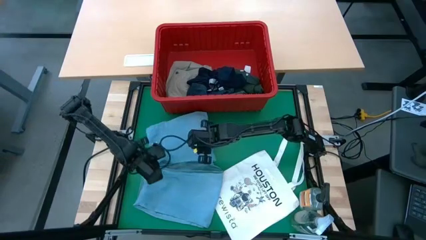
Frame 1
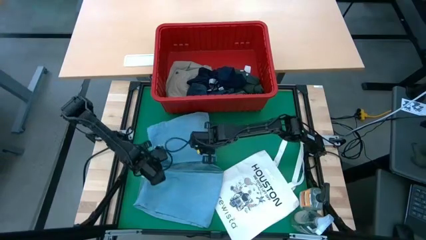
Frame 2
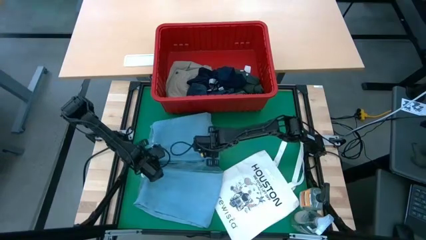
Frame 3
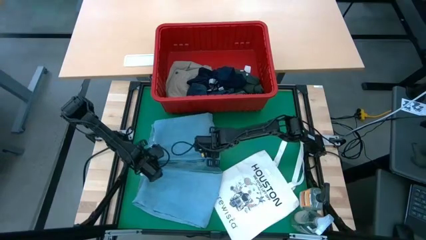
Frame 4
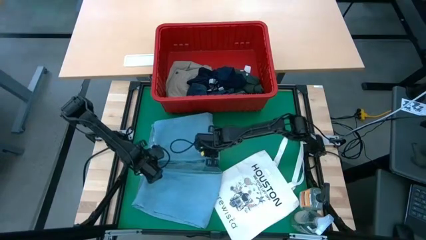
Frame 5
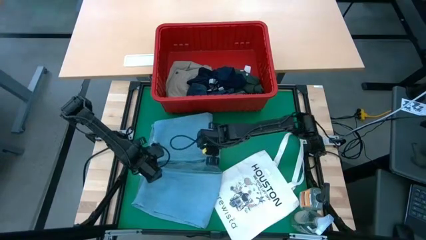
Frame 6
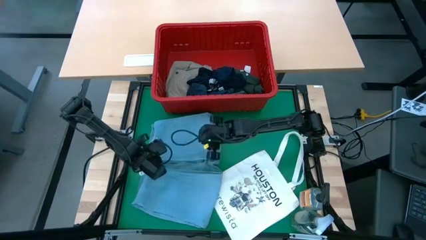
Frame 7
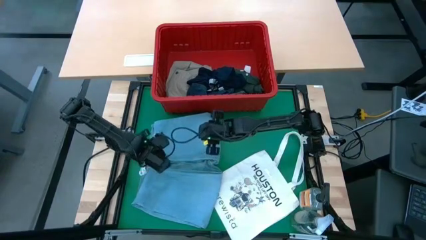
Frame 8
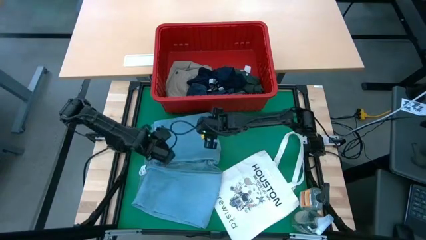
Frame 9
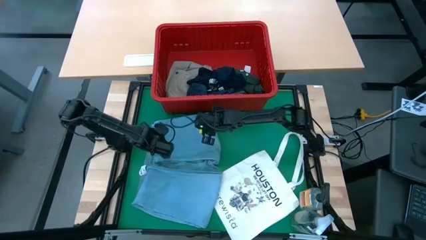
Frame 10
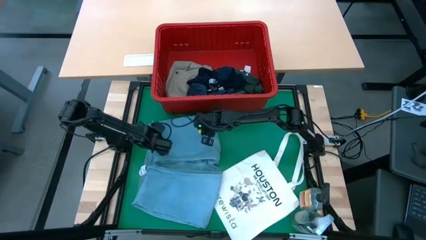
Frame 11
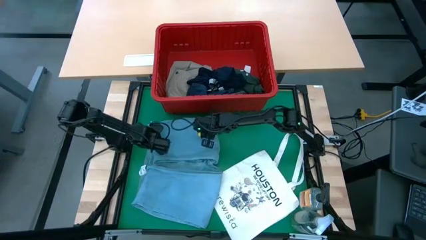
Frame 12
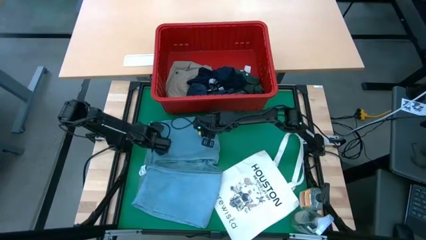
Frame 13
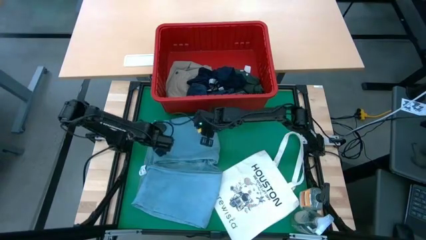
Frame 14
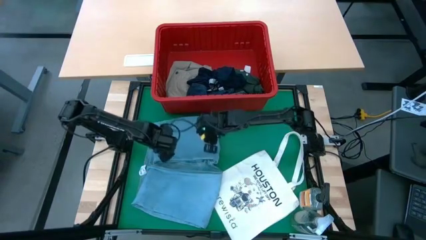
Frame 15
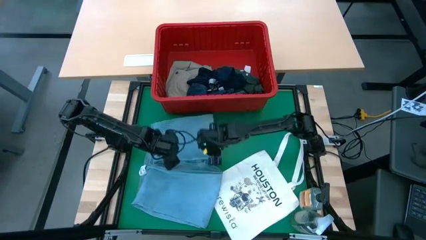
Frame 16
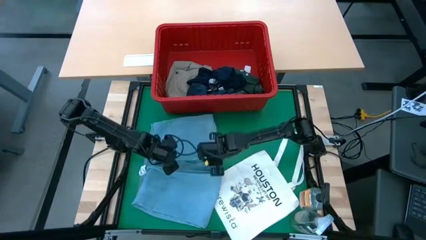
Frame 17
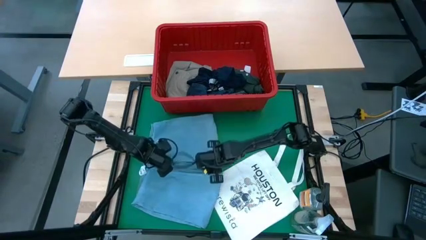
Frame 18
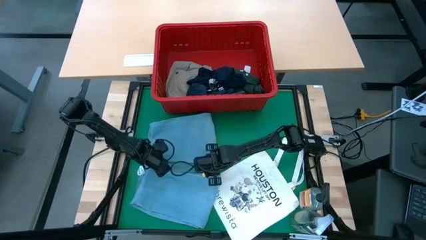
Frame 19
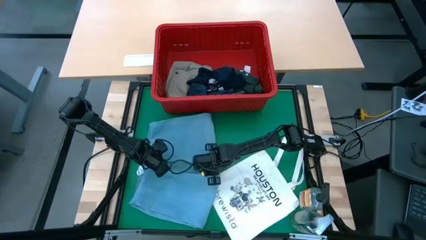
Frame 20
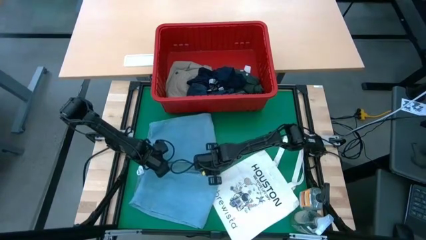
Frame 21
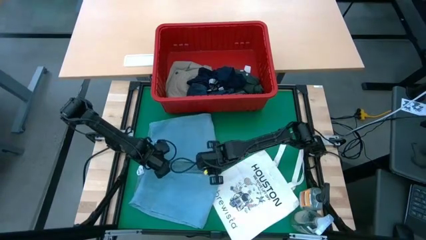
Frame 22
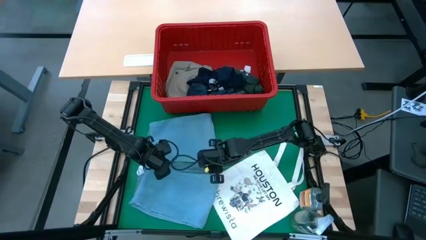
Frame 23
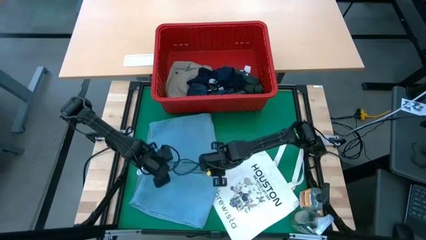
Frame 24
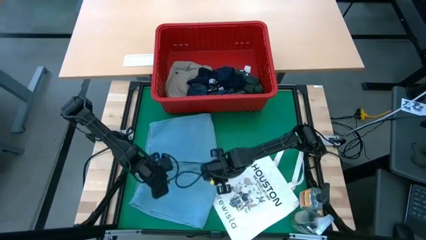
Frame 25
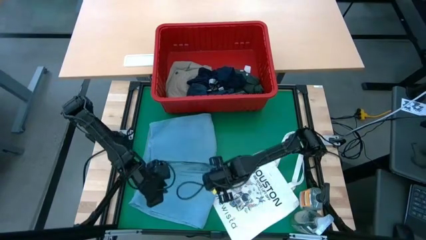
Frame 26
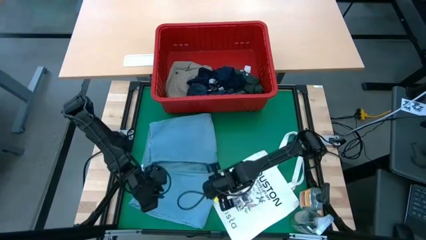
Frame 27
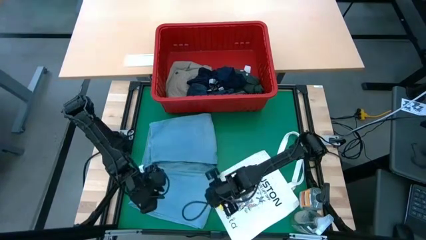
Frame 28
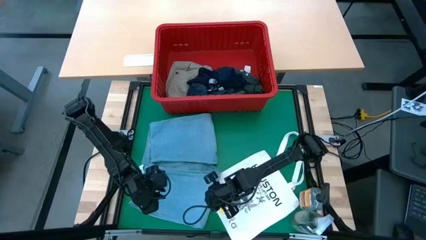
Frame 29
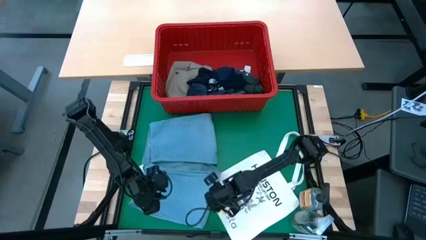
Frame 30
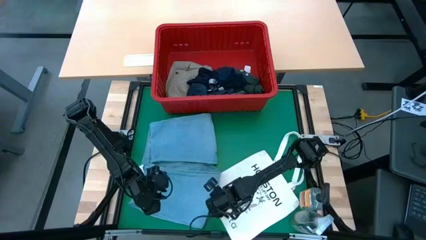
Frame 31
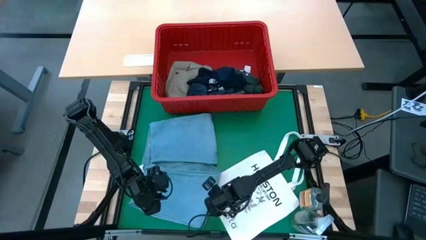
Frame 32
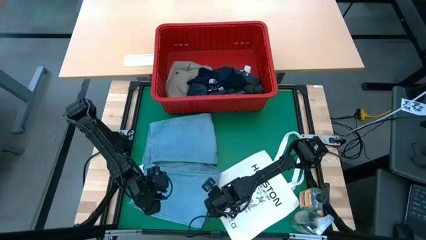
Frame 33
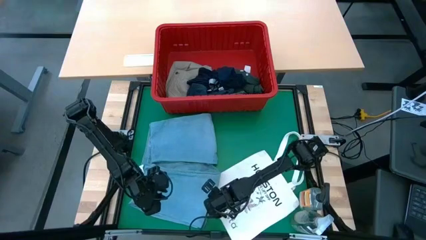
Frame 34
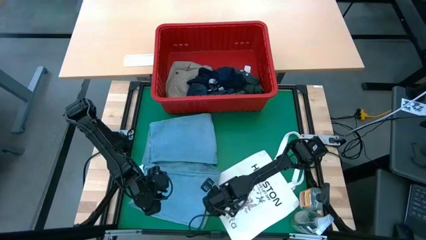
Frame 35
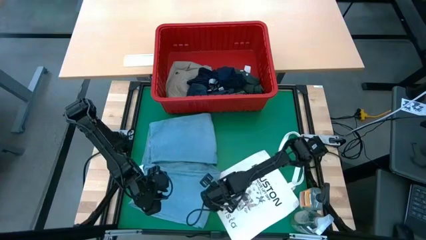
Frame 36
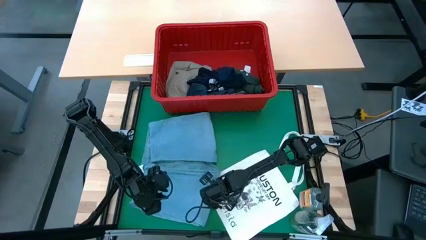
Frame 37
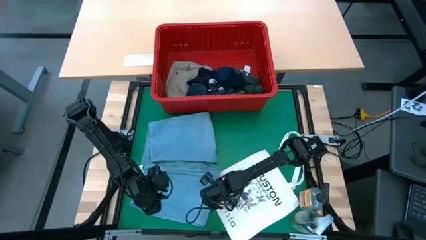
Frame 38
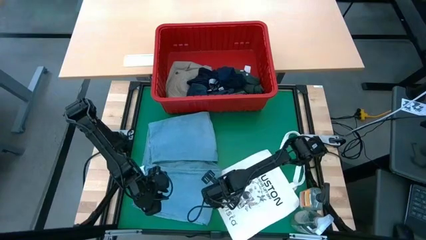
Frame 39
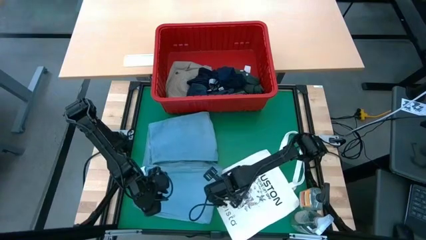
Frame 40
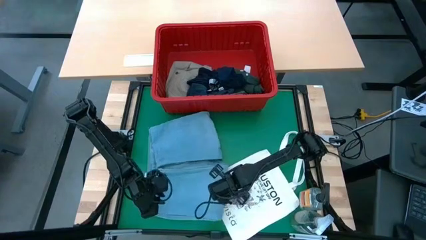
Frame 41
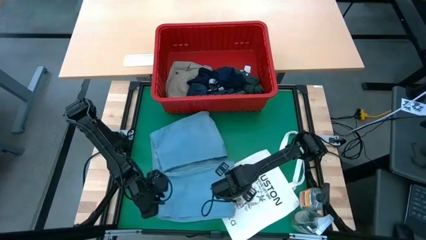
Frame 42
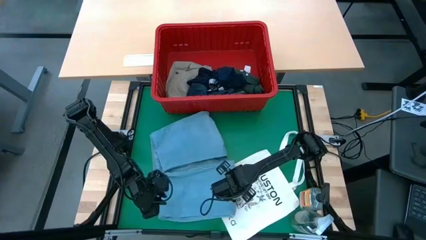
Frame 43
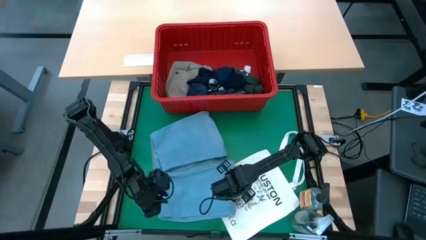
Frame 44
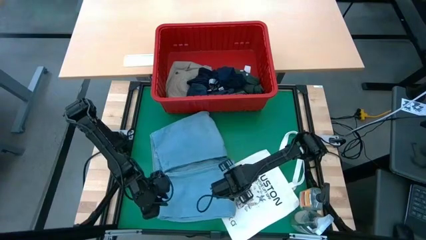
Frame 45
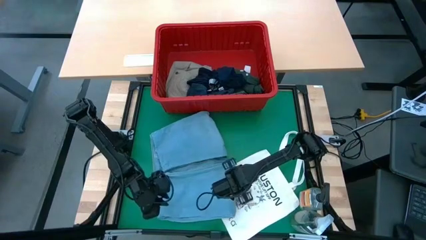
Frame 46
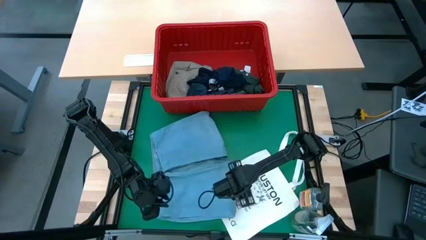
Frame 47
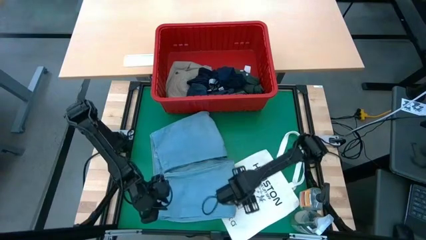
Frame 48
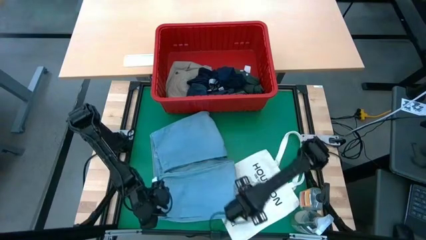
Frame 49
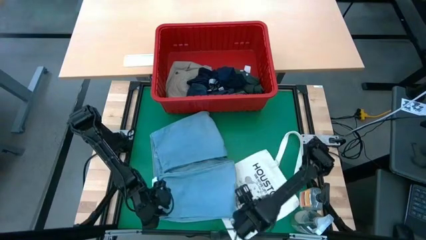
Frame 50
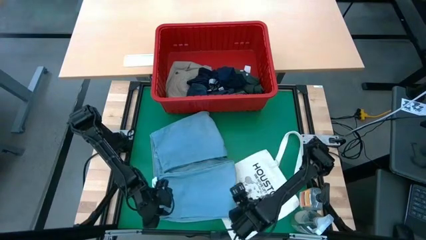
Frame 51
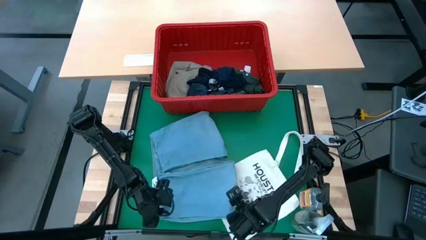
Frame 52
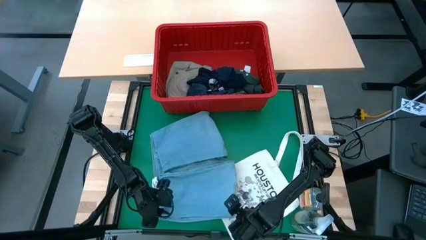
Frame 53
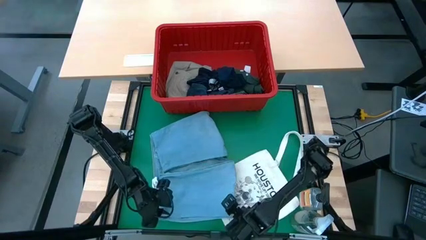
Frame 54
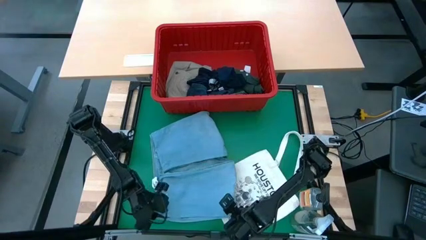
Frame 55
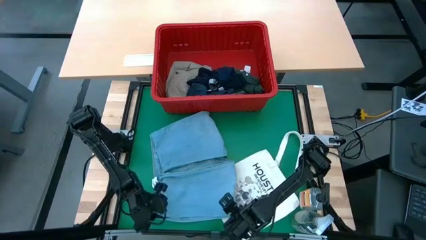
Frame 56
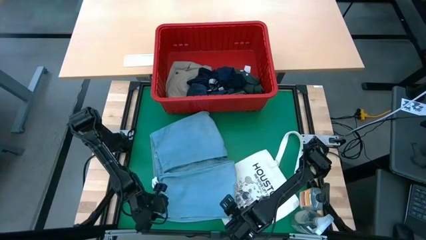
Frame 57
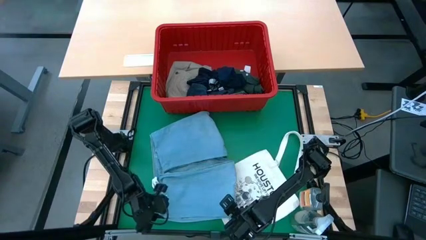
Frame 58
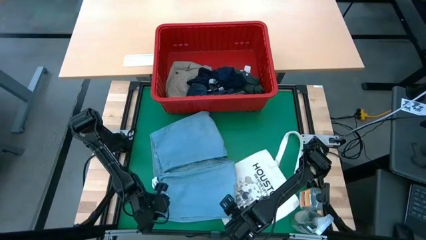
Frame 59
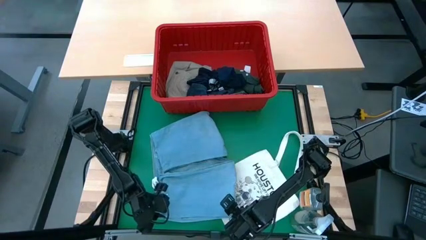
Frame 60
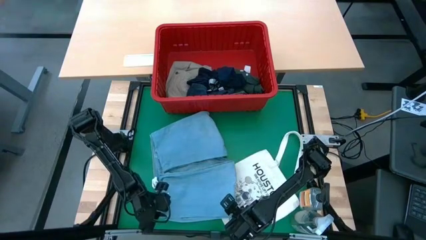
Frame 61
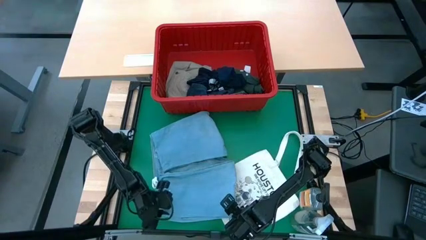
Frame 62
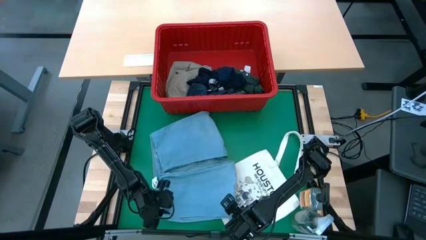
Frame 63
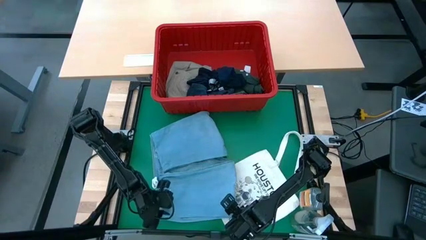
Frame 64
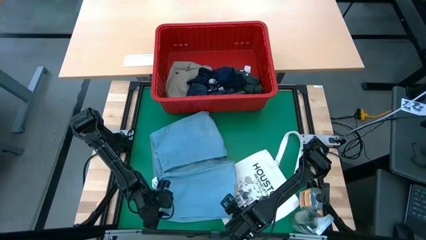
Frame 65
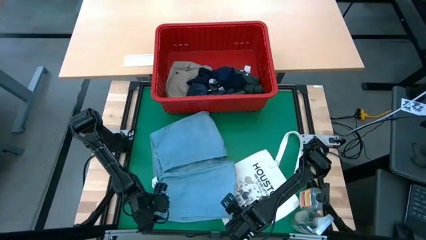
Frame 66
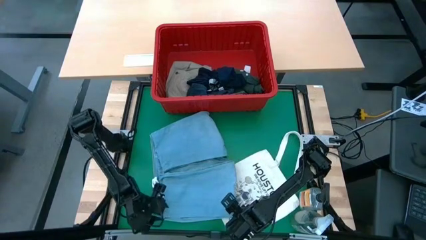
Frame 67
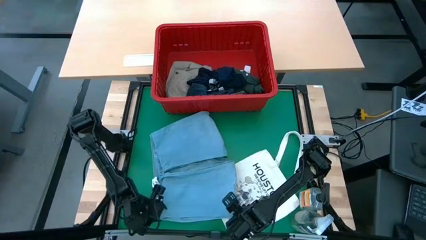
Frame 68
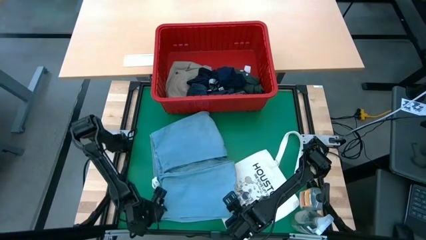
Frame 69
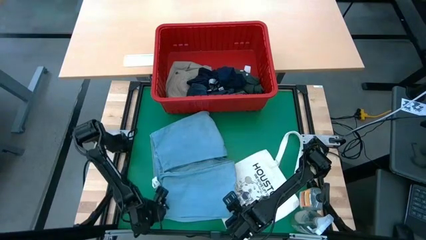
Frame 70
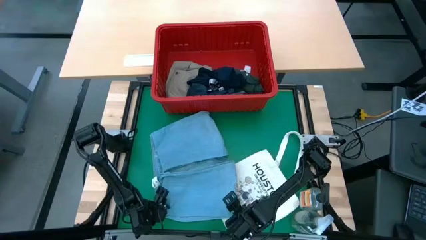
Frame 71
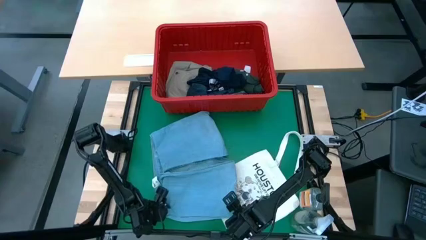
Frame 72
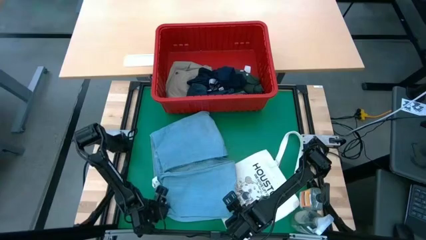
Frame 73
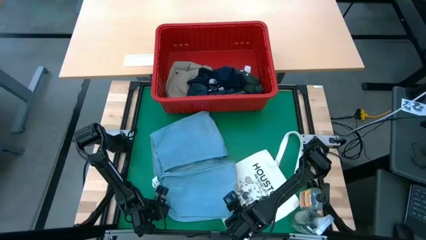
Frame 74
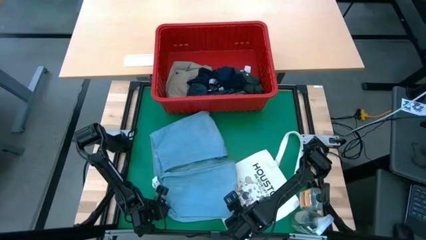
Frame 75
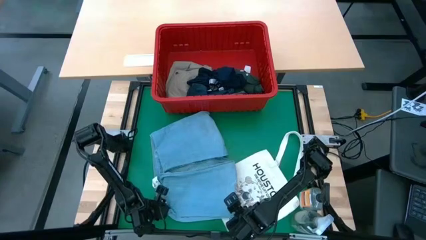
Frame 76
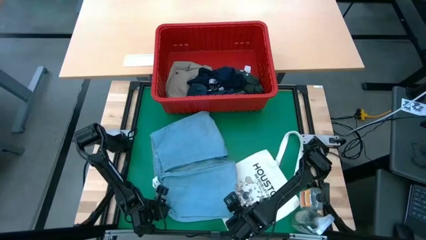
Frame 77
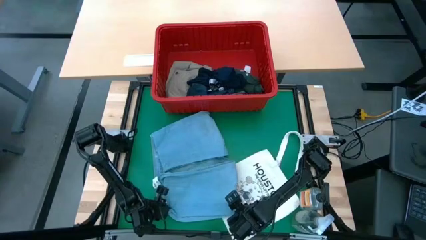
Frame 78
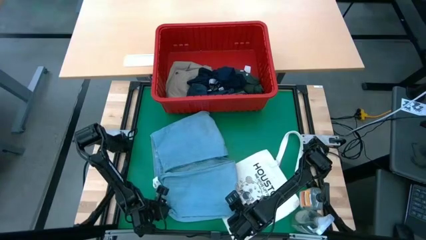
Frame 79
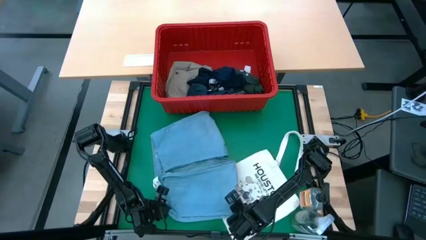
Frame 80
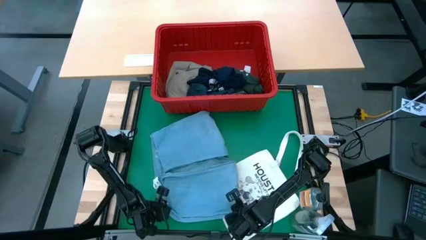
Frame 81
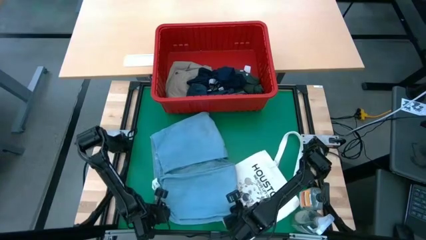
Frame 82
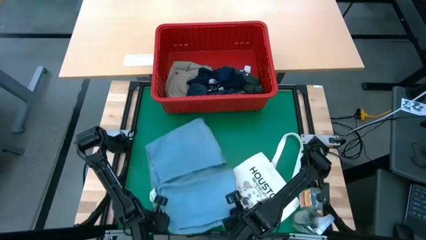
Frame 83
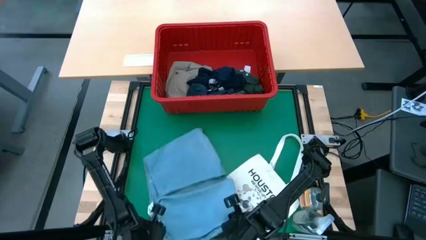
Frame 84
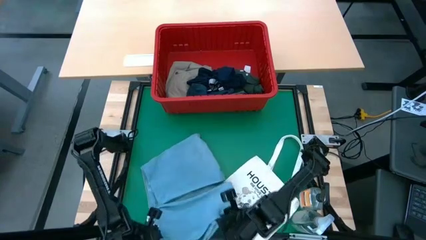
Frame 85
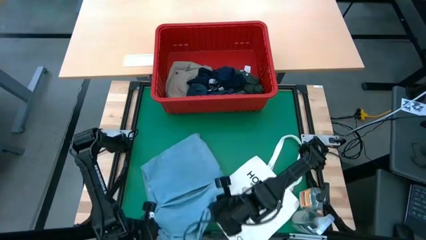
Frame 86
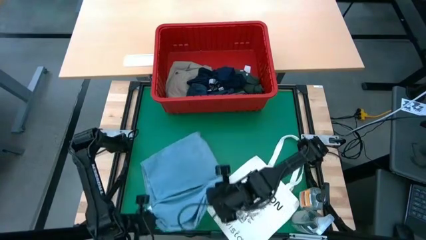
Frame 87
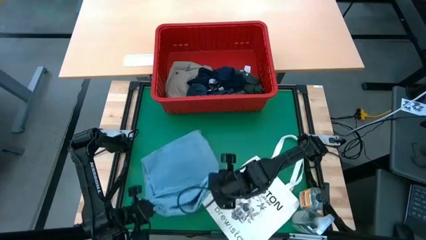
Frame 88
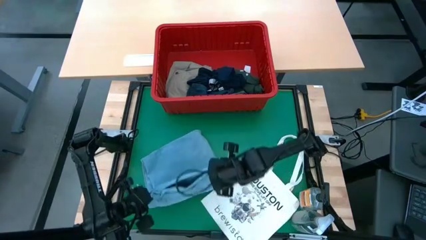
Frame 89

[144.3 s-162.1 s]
Task: Fold Laundry from Bin
Fold the blue jeans
